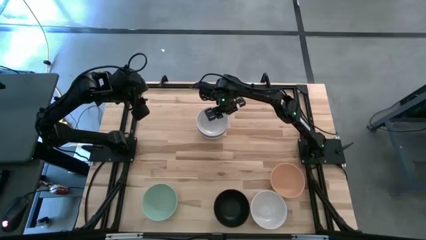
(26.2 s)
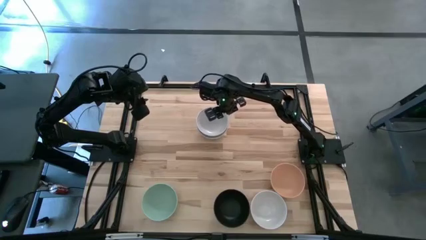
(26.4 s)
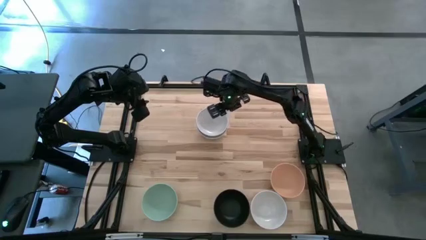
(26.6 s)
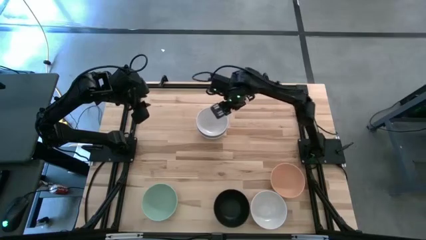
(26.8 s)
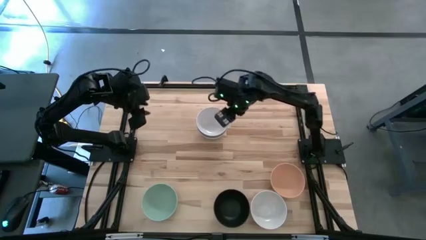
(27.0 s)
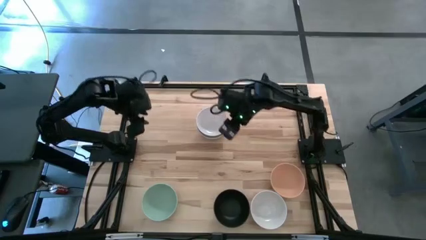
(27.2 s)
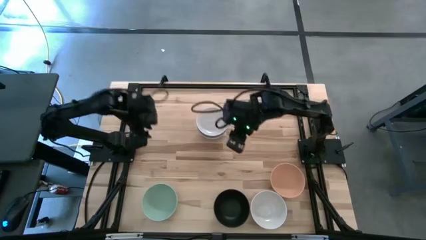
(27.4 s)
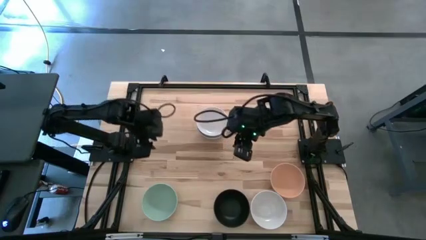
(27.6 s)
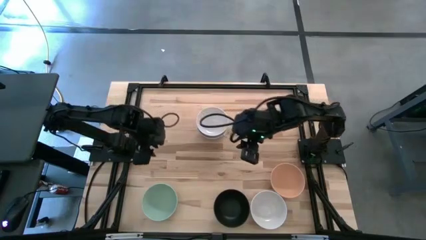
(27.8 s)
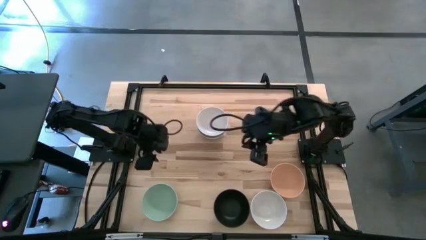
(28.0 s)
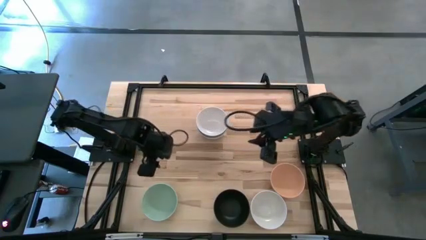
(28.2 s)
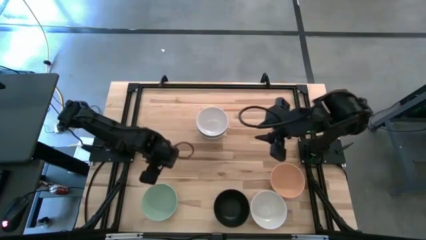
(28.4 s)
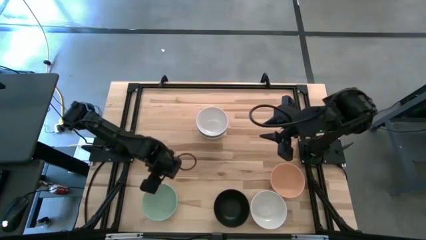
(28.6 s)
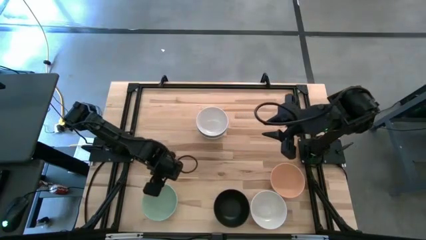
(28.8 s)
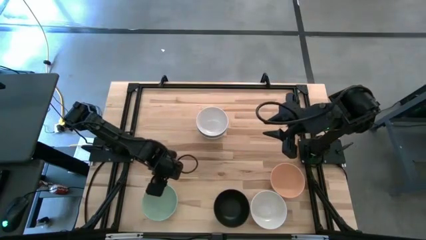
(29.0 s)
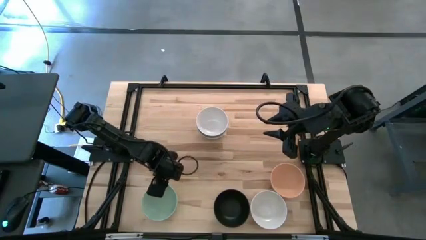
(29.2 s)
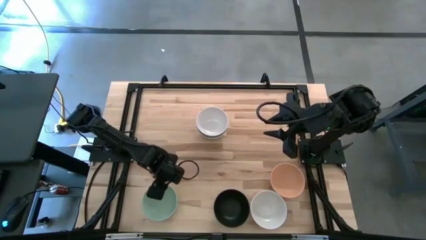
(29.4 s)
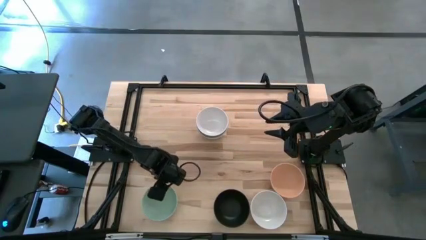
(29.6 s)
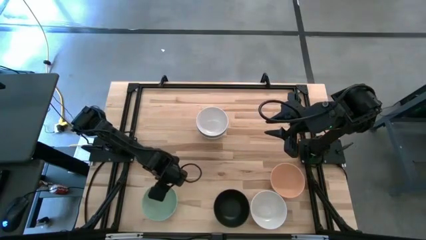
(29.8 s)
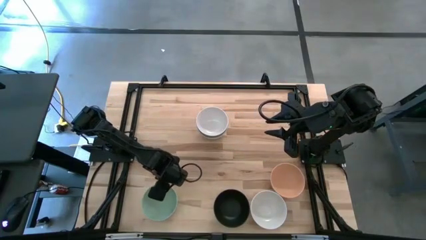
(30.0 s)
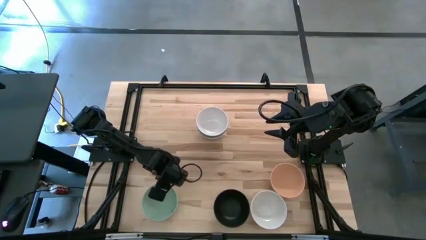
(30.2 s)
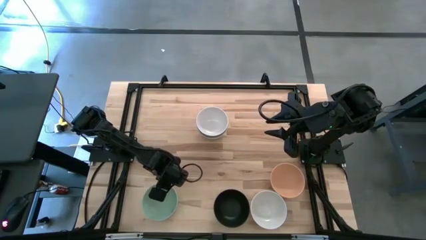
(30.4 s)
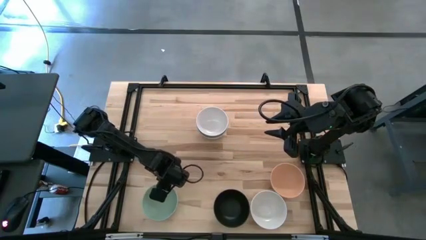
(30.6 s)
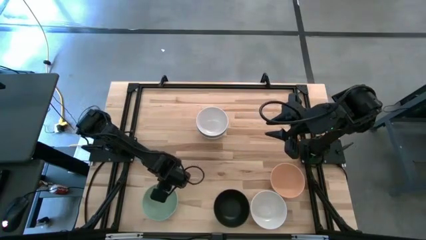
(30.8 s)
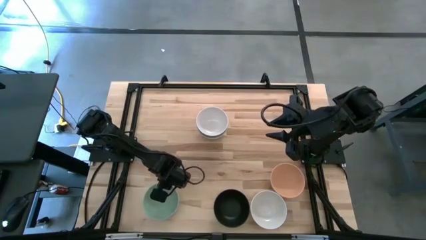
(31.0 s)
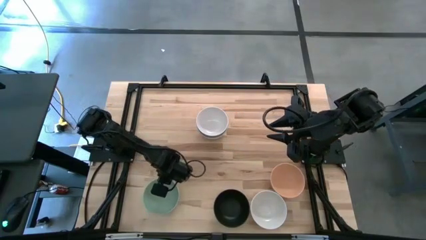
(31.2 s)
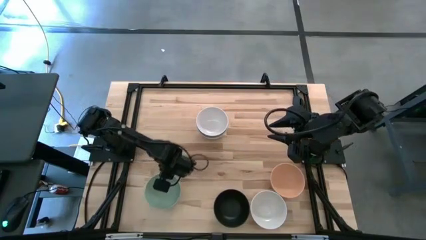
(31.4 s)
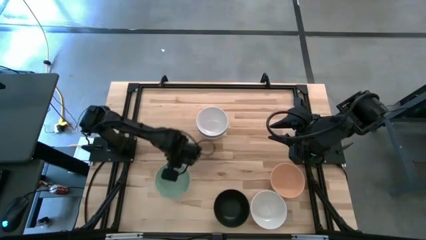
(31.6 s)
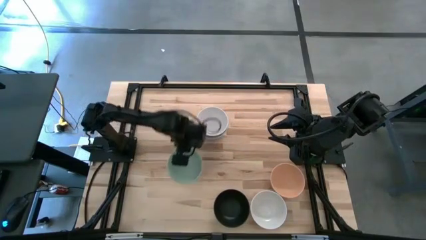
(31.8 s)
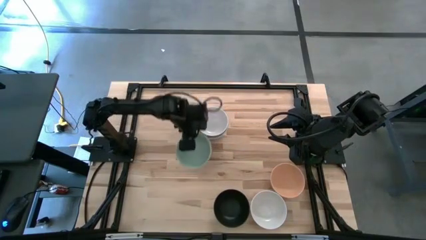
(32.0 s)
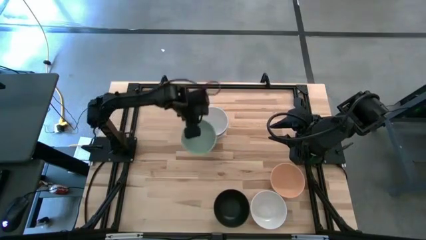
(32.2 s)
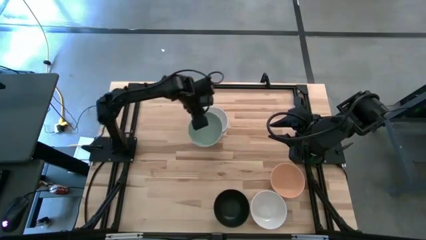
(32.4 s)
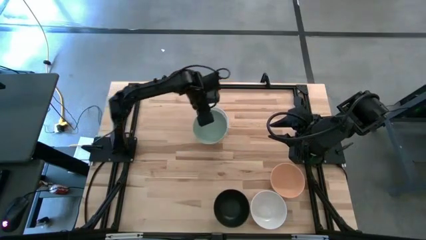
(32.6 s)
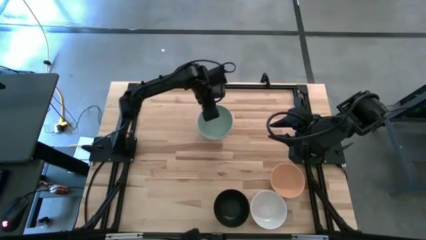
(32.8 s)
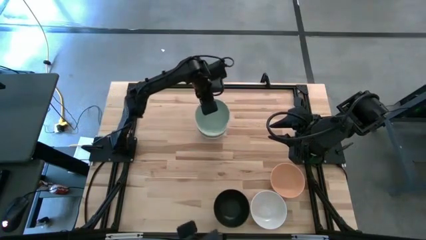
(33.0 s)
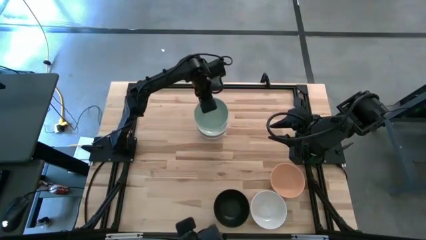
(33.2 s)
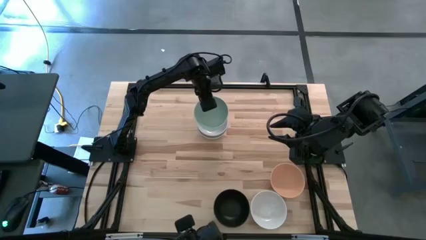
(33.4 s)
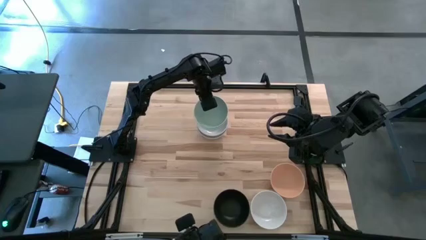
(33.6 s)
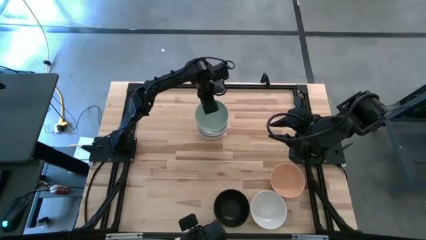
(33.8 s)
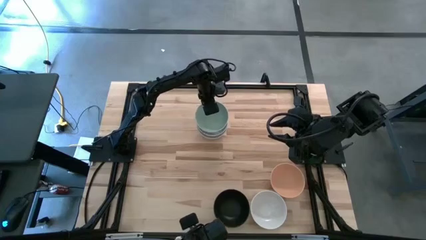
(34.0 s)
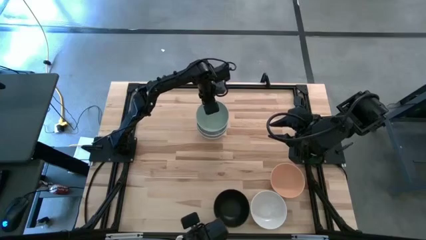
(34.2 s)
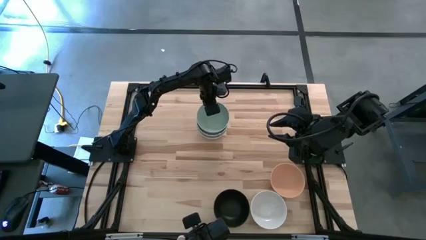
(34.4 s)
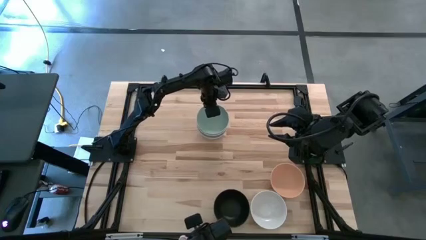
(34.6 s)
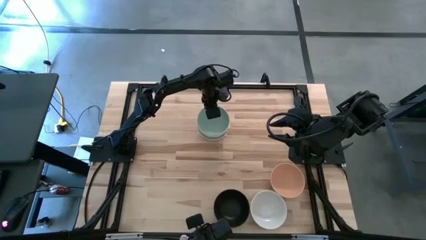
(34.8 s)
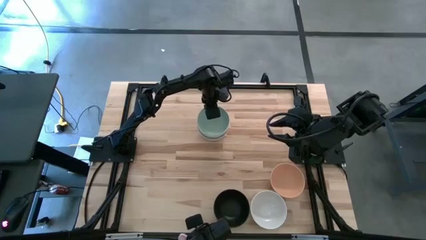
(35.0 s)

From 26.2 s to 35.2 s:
Task: Nest bowls inside each other
Stack the light green bowl on the white bowl
